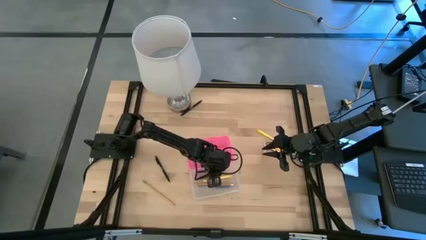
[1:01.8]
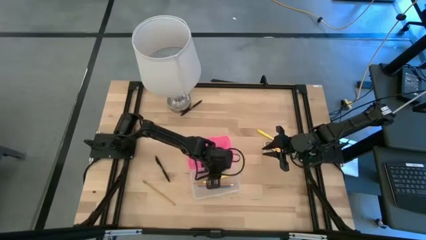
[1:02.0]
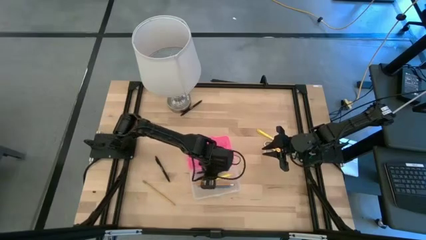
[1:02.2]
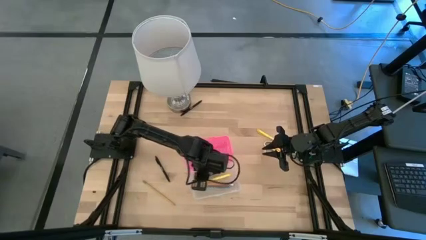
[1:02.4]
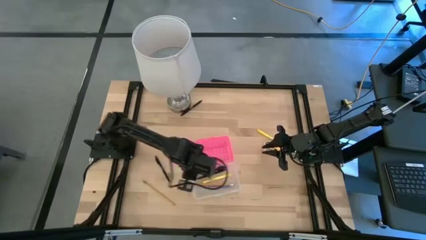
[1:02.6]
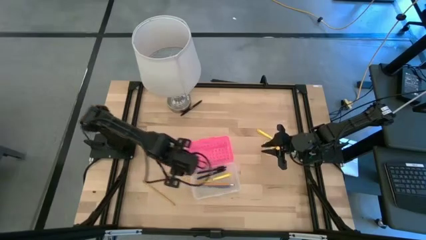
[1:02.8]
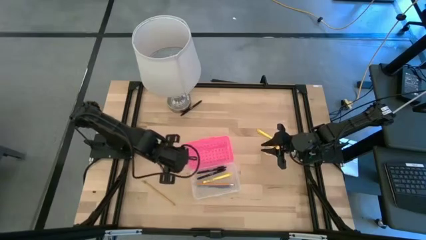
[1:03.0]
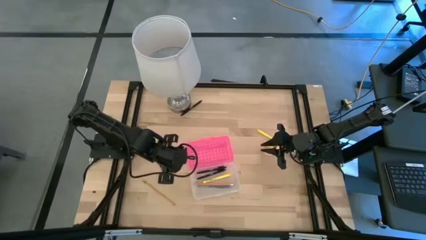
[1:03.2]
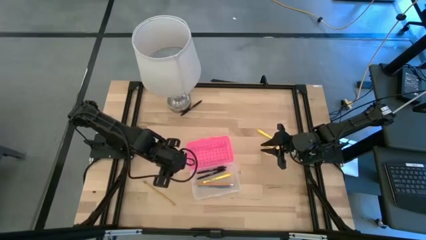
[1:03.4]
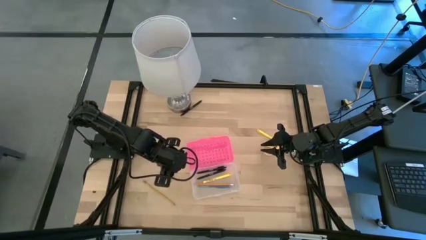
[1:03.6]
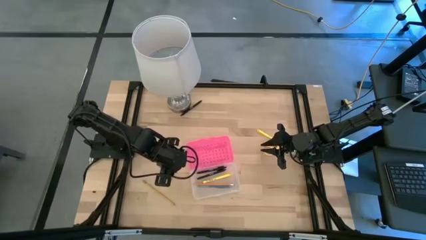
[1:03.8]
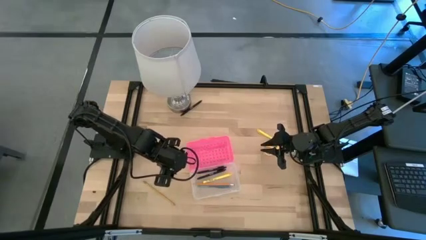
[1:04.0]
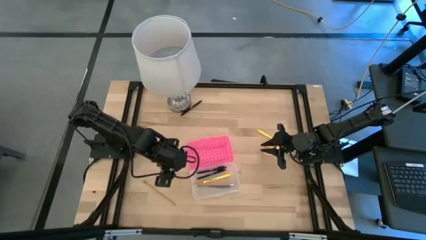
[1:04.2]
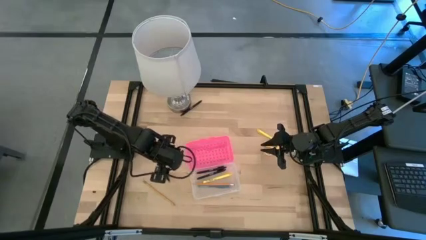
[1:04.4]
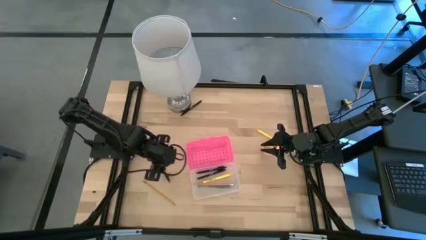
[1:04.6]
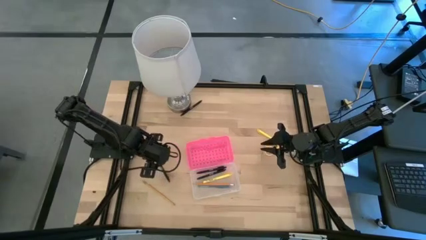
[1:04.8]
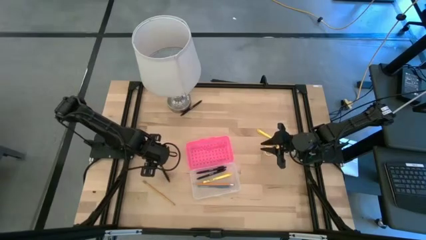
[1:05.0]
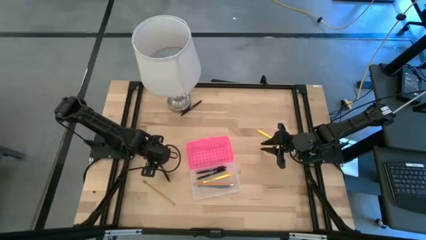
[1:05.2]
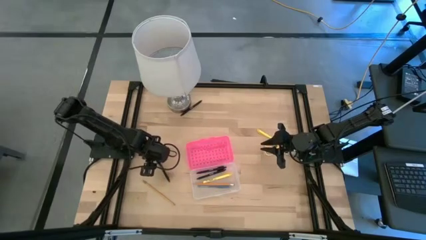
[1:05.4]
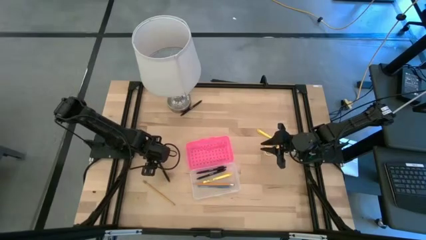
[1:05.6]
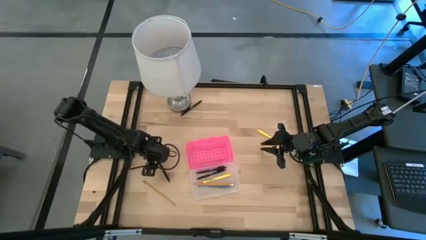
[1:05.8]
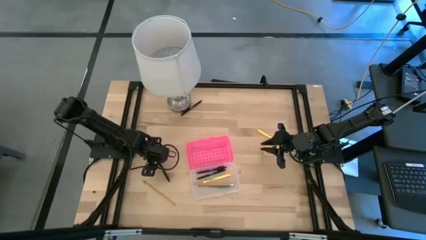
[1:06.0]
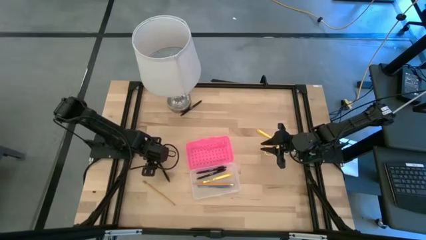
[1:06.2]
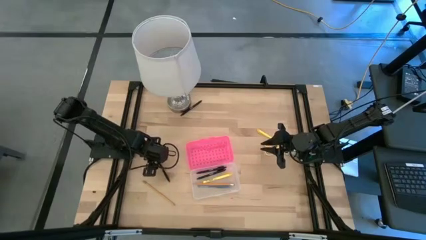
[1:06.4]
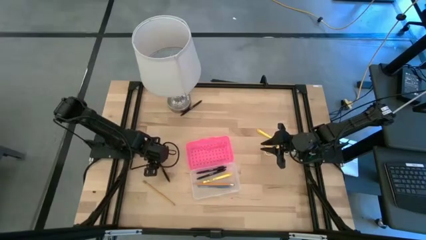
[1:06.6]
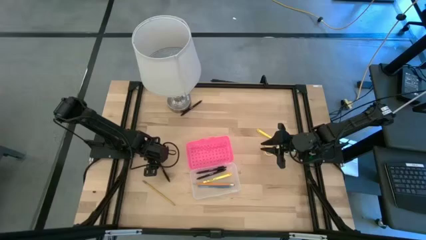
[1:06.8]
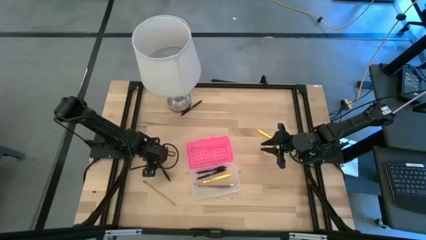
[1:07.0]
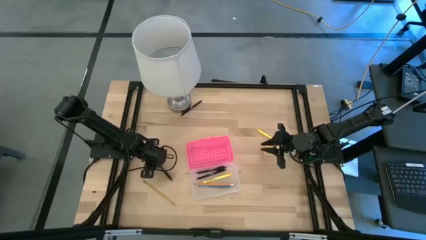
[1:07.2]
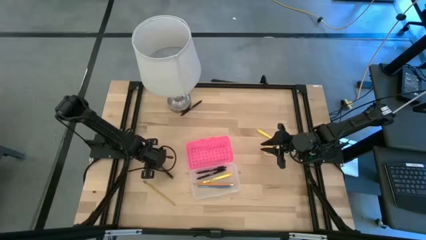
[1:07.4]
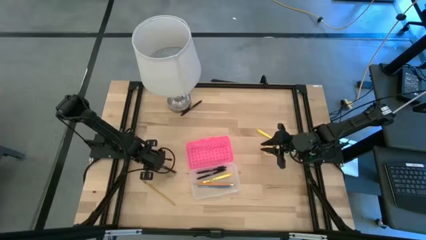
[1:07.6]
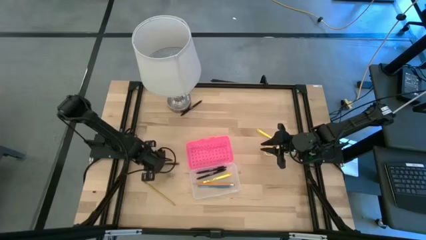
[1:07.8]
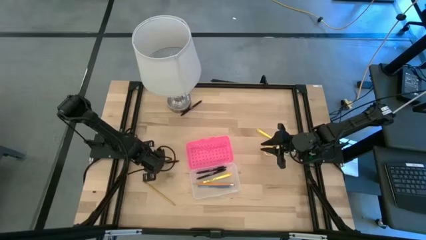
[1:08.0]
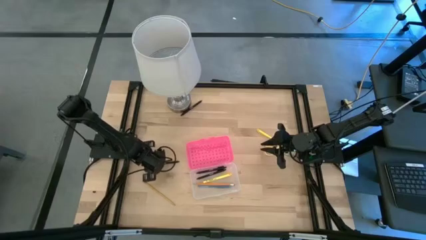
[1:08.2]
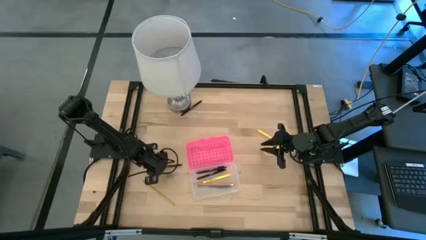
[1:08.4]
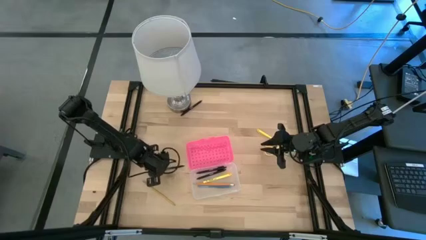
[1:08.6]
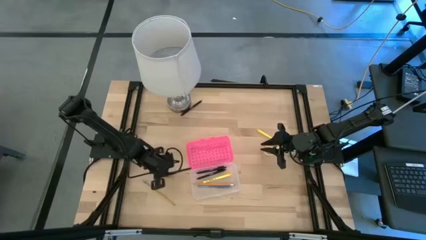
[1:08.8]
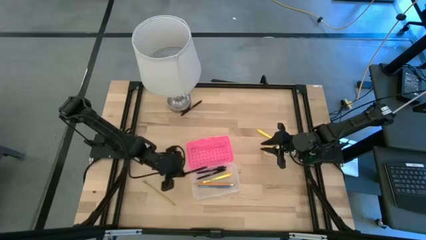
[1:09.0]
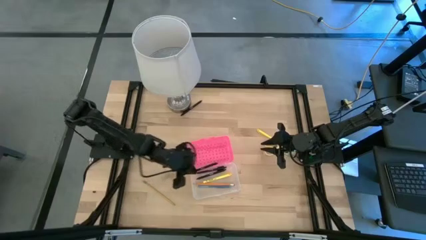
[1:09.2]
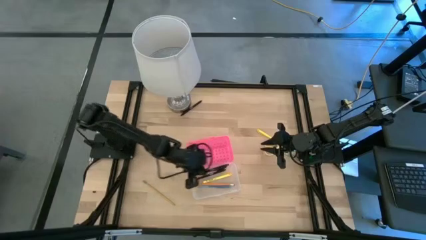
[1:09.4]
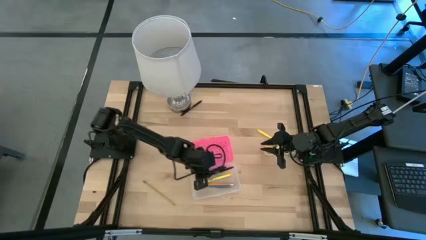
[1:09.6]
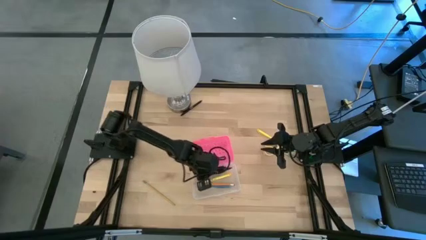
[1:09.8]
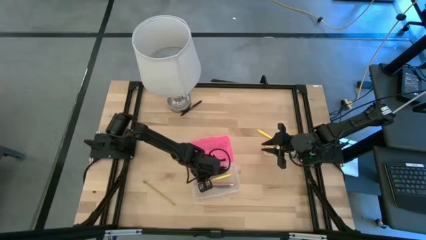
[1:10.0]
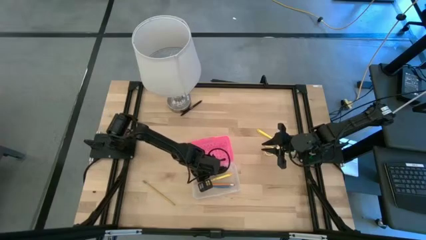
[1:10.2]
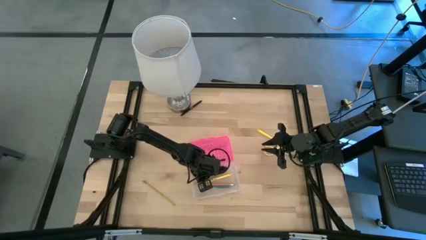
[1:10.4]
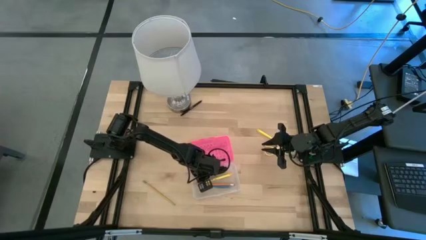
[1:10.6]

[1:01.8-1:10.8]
Task: Pick & place school supplies into a supply box
Put the black pen into the transparent supply box

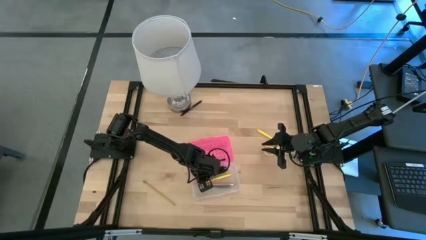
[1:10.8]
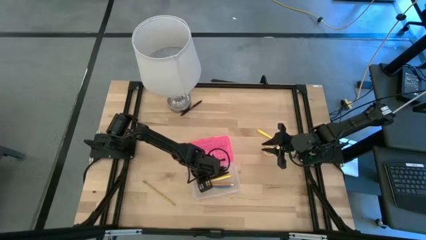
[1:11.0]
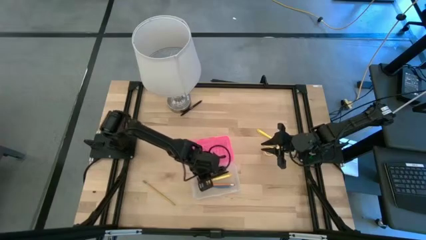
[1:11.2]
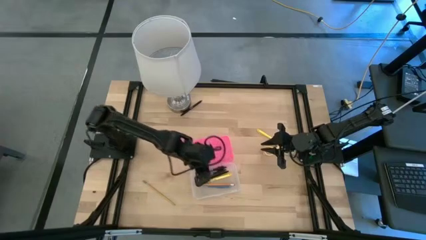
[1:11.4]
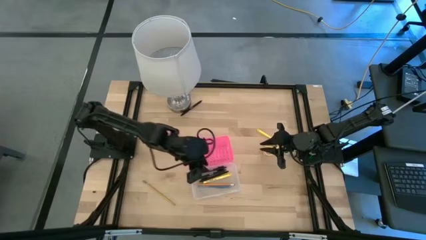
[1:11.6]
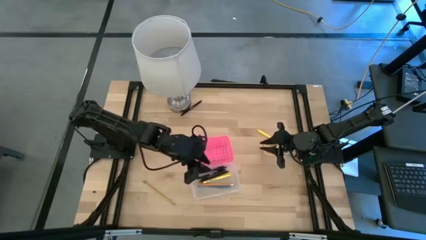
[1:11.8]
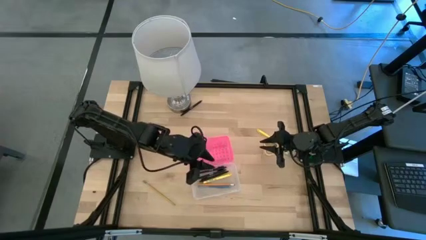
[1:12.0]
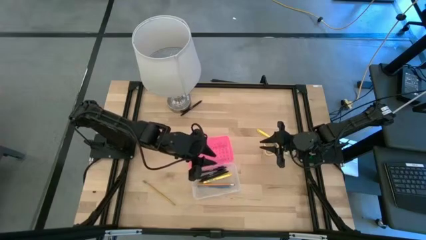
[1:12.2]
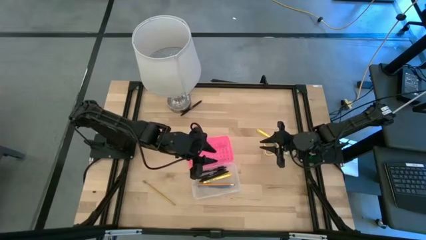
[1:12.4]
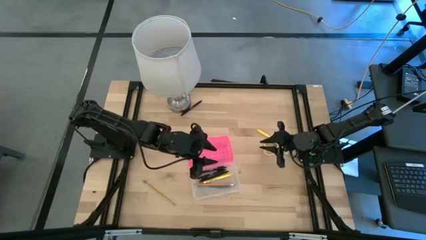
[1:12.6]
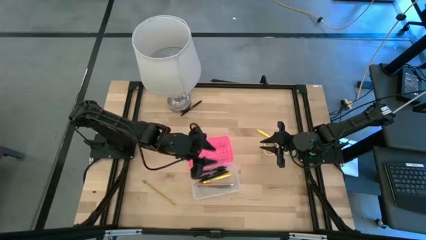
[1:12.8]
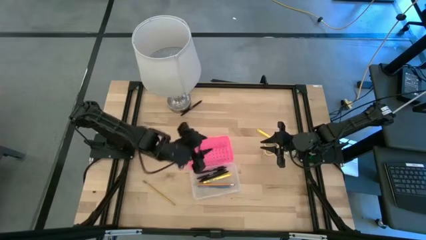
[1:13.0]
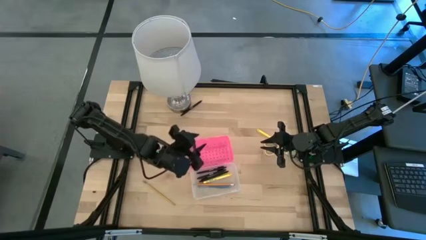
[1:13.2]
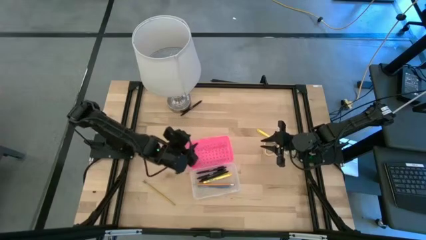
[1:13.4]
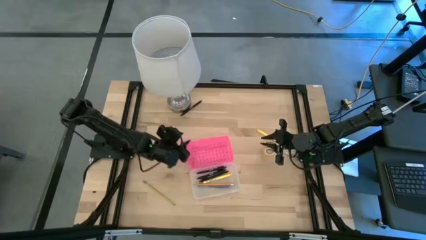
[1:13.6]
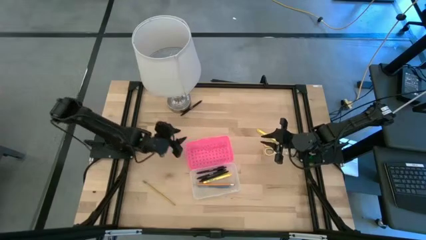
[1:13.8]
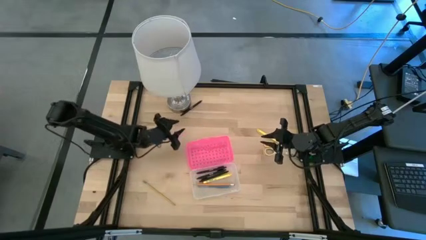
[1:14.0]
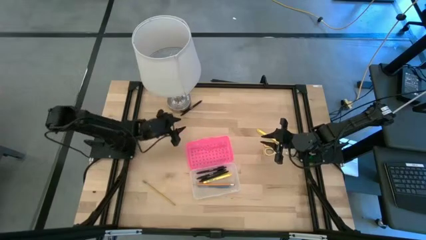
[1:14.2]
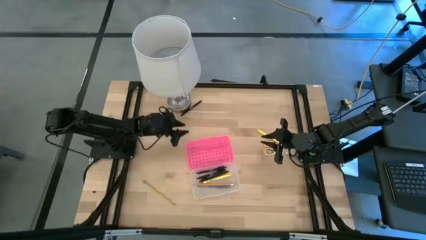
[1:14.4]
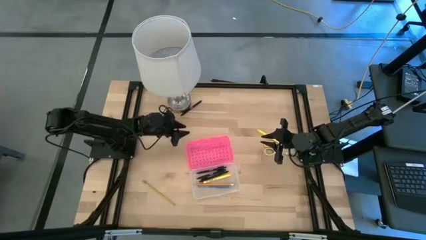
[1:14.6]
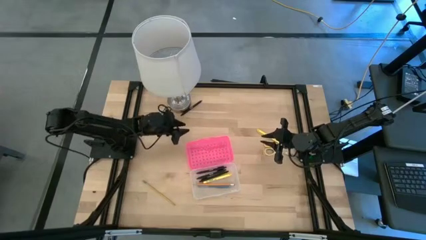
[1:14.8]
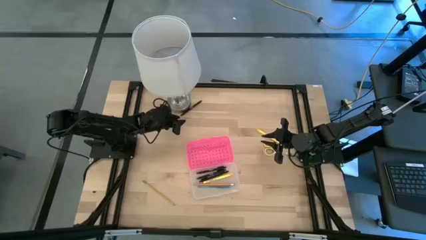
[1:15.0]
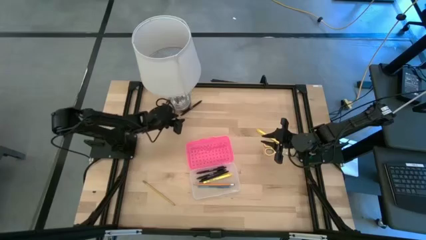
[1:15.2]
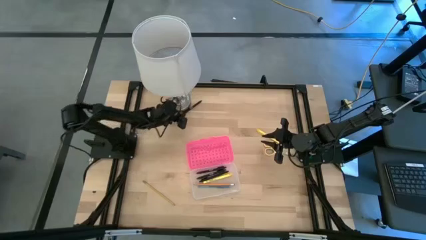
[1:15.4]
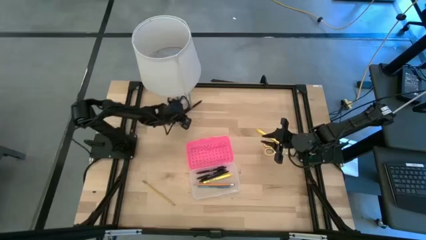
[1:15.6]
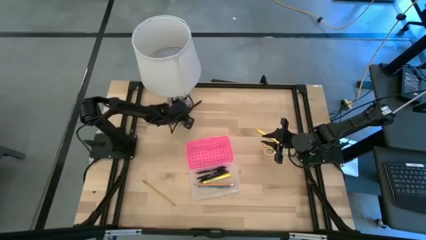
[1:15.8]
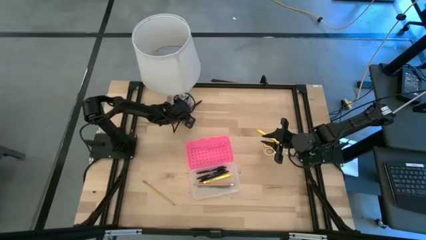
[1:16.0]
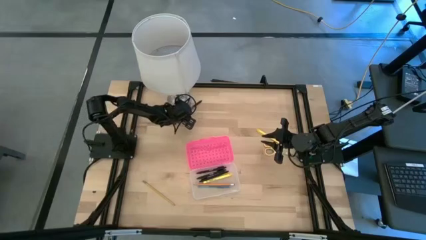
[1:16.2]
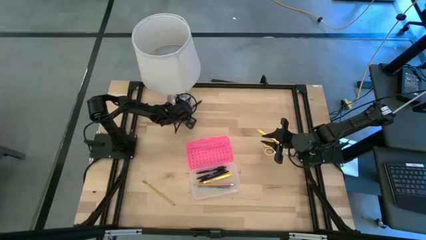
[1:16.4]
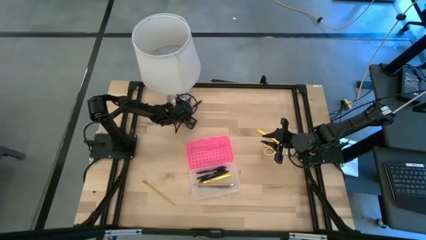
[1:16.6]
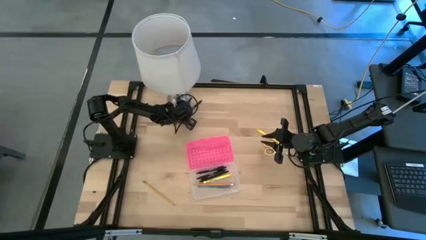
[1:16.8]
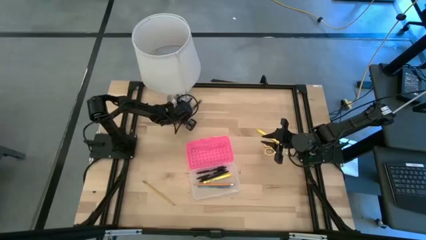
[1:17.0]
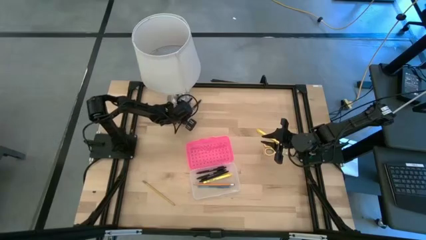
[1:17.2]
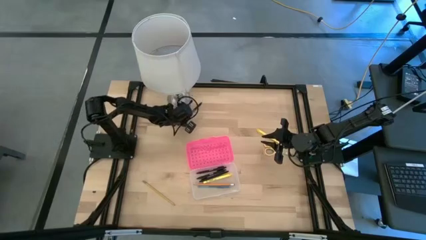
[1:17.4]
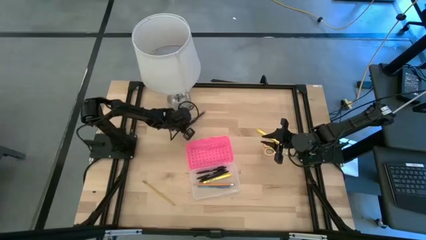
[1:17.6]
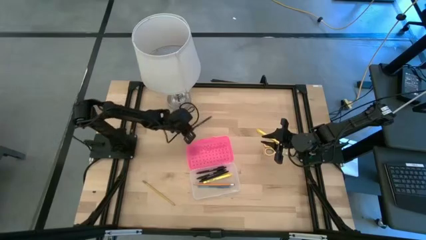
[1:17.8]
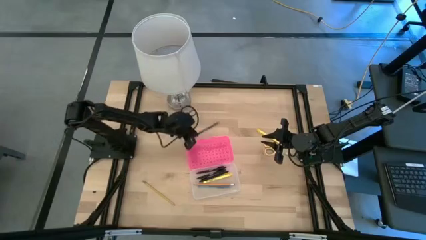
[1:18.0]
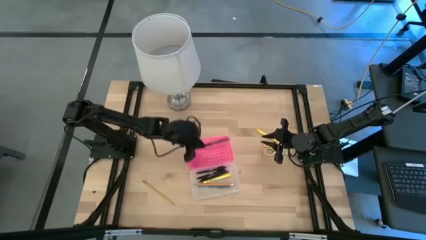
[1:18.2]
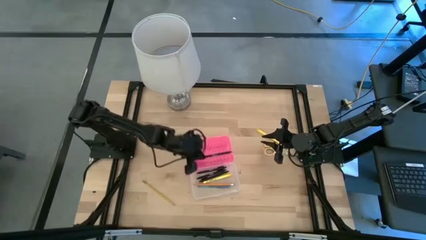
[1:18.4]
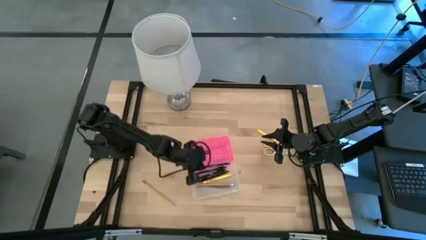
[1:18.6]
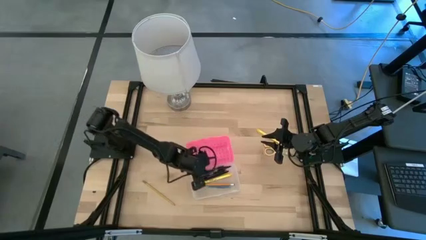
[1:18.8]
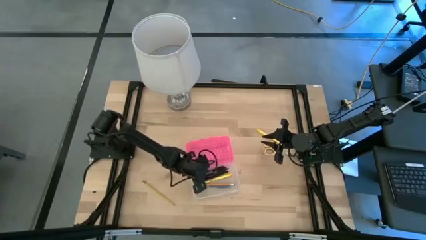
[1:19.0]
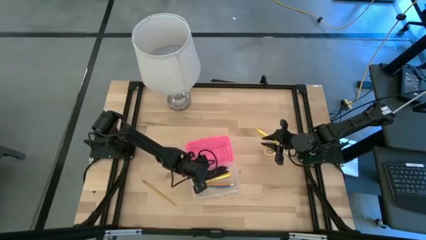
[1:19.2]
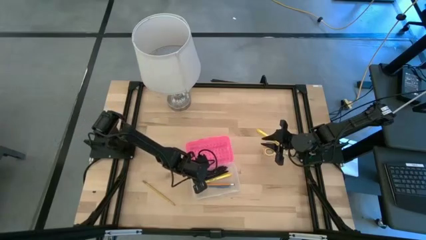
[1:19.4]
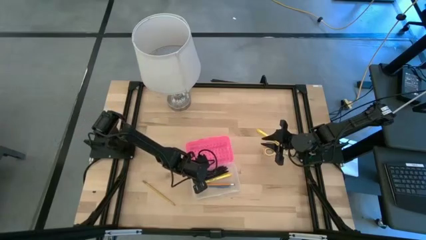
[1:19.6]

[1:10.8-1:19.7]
Put the black pen into the transparent supply box
